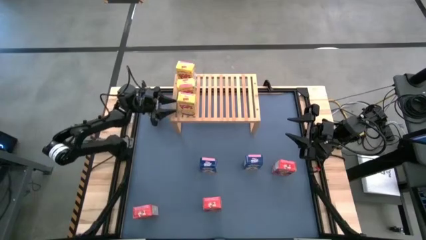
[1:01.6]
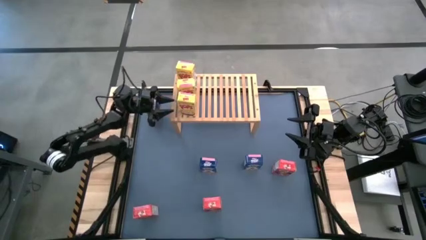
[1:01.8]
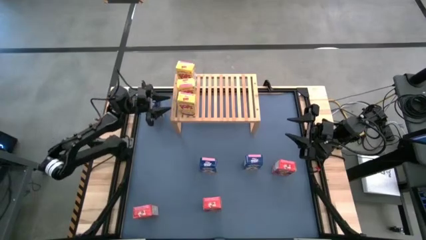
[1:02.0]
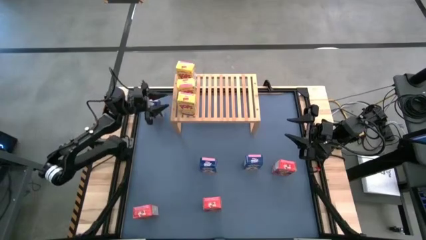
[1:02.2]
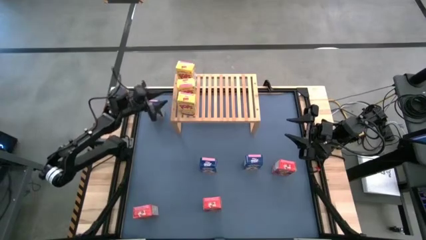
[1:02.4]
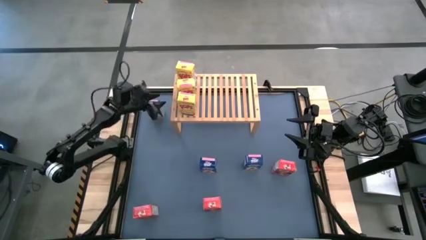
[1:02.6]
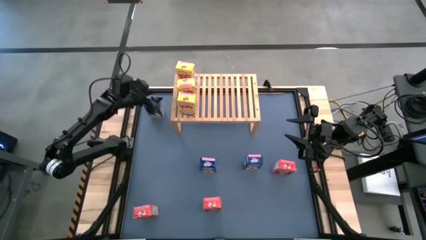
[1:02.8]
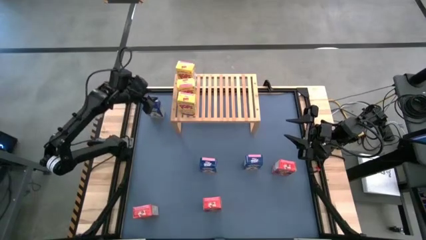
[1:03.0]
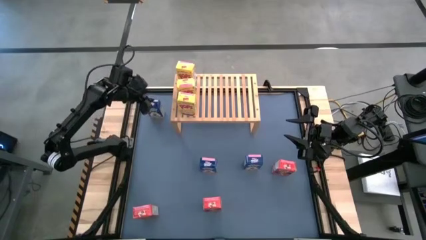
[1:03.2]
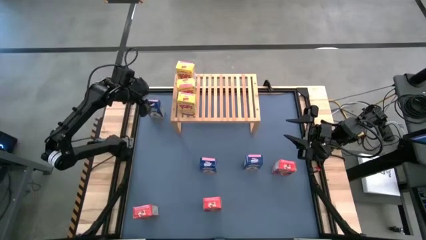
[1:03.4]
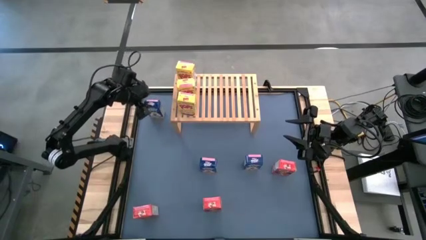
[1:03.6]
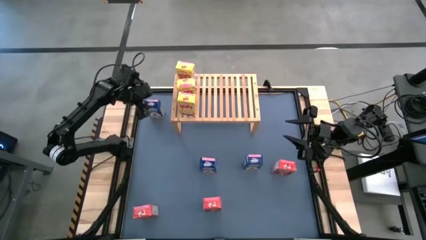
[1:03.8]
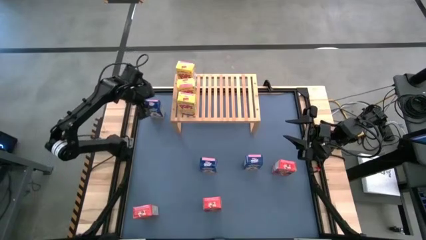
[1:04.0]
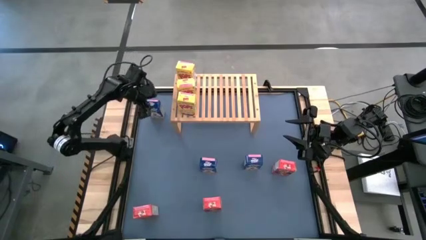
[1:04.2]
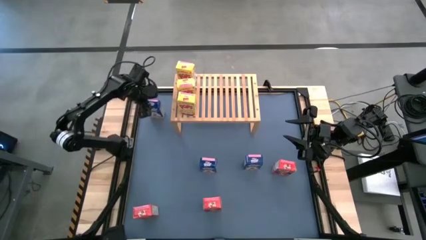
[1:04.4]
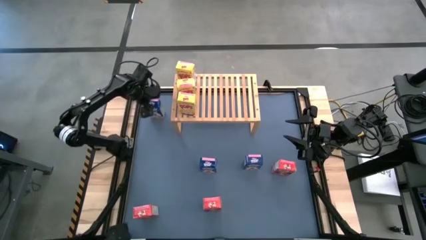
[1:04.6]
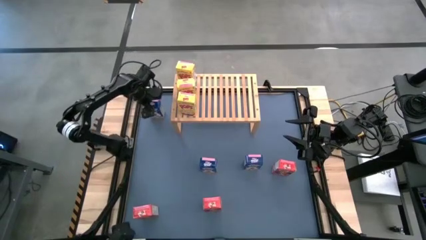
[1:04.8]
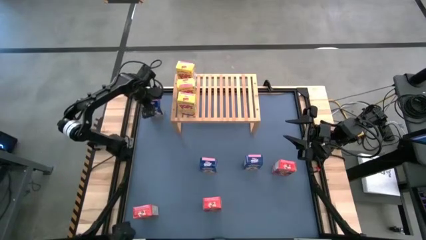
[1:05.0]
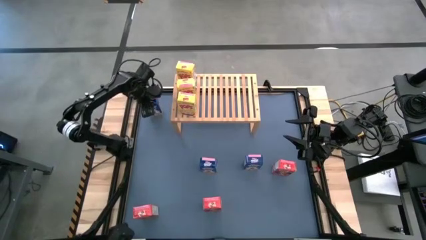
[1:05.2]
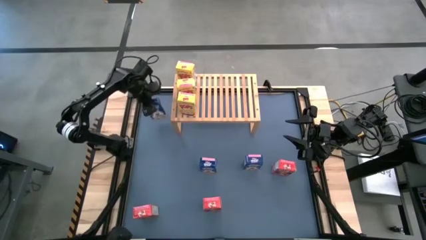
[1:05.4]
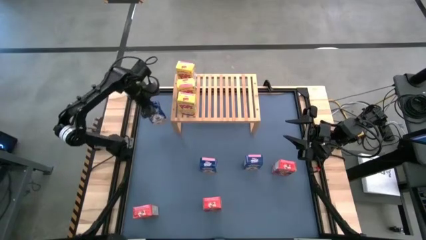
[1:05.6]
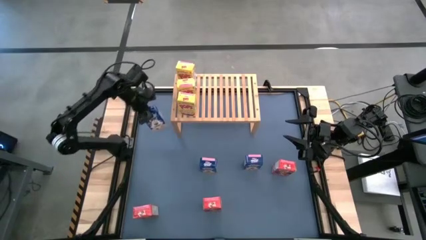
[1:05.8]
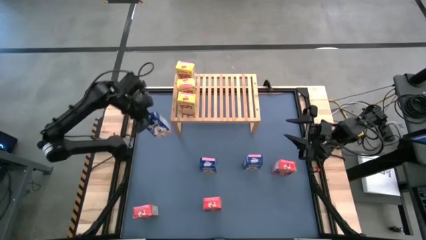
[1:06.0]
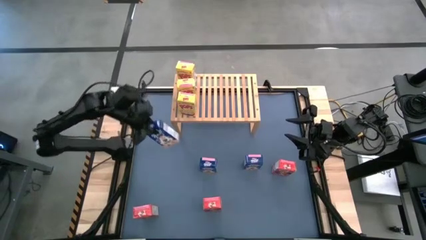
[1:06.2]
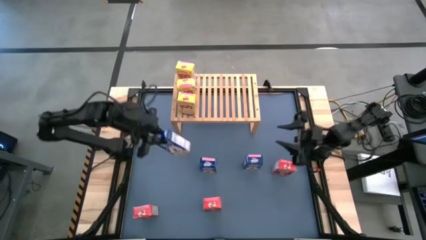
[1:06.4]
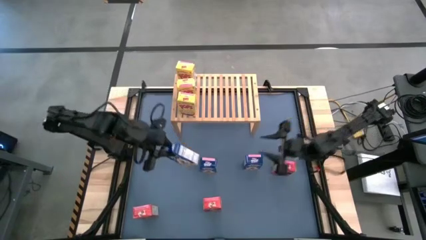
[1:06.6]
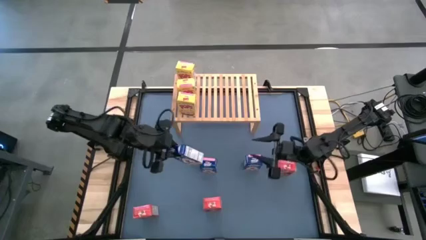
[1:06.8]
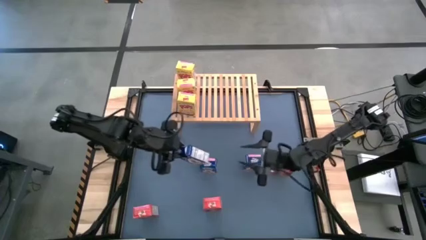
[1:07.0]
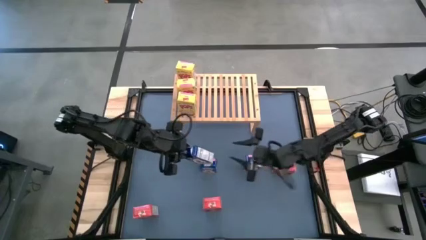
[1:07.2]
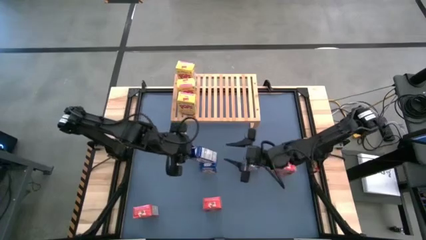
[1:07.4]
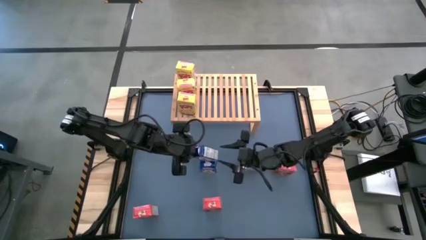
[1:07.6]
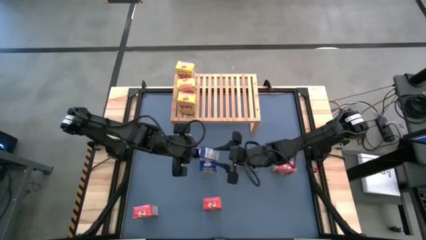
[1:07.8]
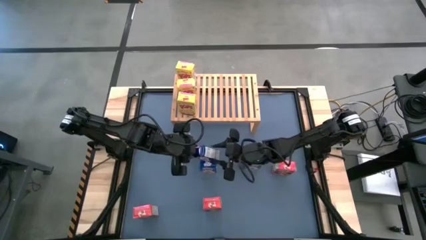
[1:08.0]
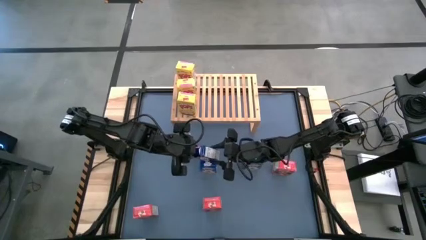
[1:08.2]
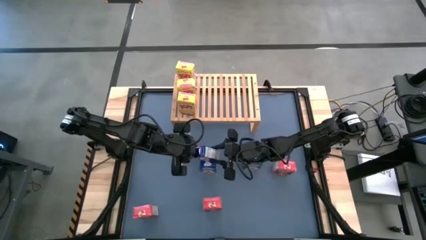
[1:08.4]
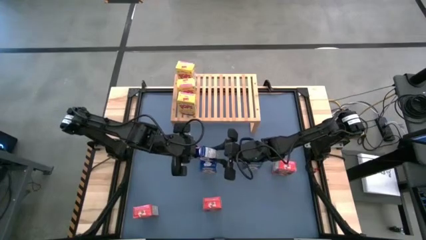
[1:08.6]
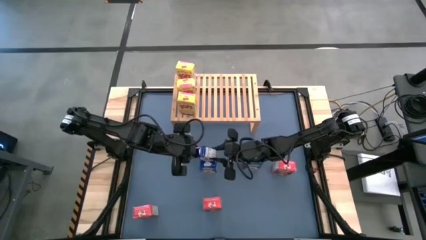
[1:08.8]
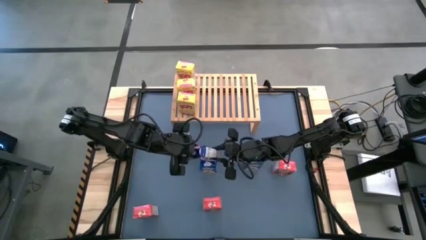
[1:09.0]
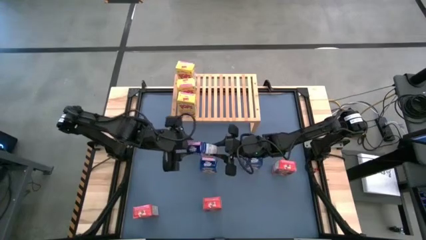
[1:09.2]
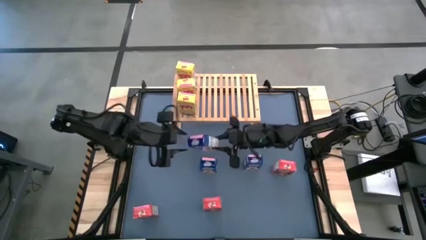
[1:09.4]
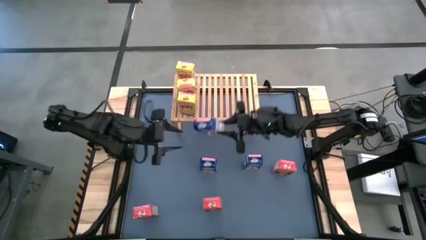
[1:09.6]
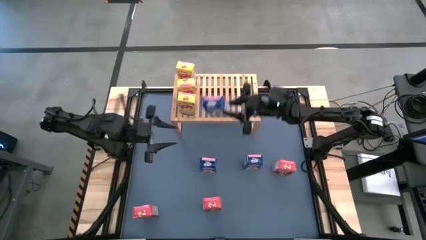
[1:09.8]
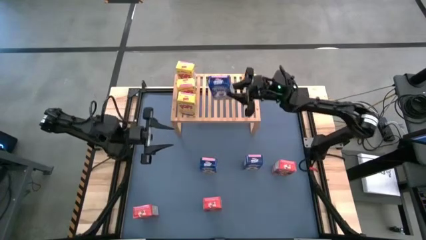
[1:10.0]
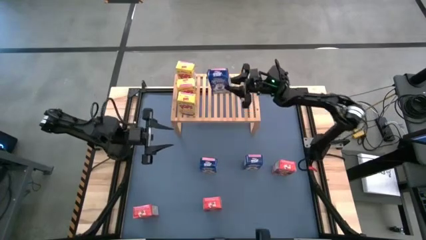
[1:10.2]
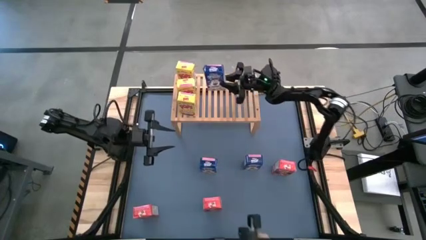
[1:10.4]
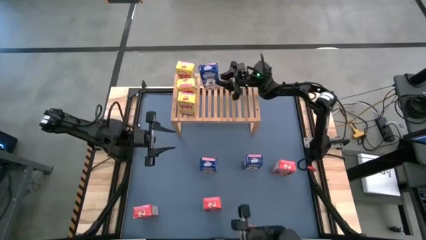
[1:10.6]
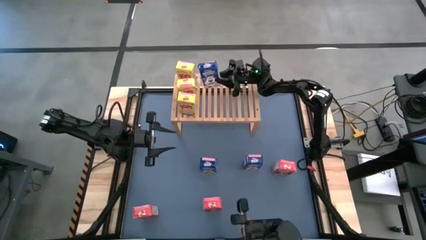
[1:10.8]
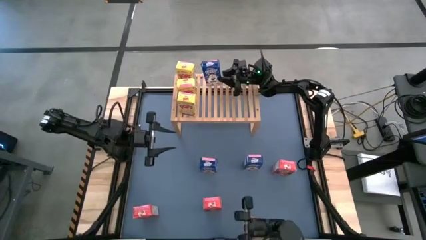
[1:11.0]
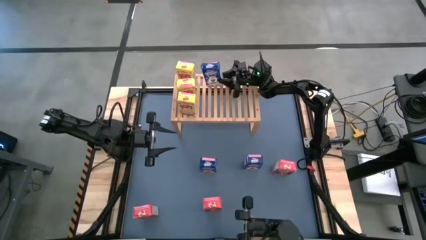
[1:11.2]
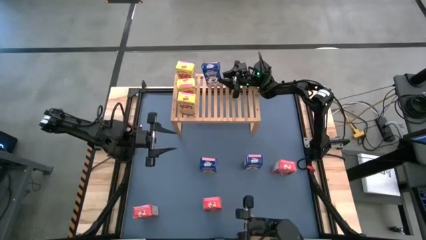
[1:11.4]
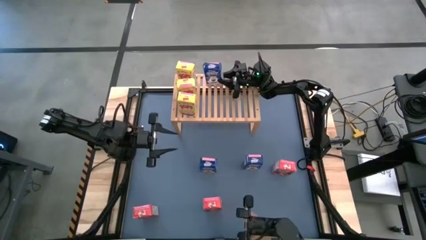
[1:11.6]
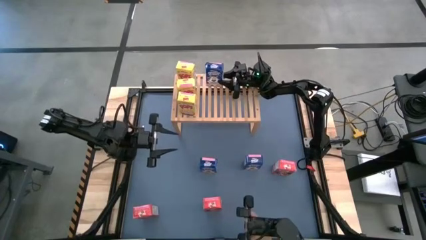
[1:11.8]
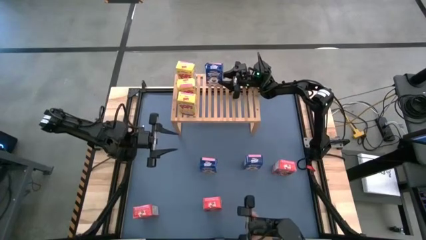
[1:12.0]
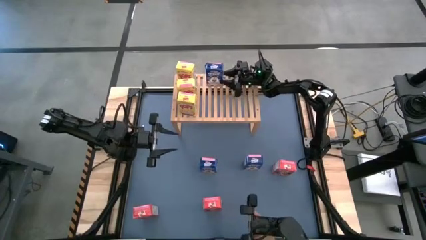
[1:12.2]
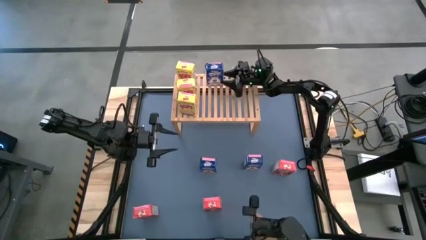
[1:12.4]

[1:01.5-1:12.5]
Task: Stack cereal on shelf
Put the top blue cereal box on the shelf

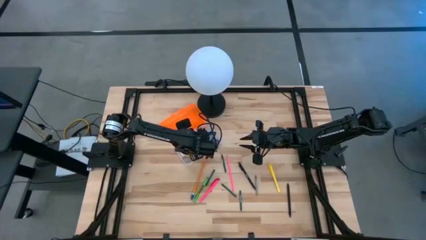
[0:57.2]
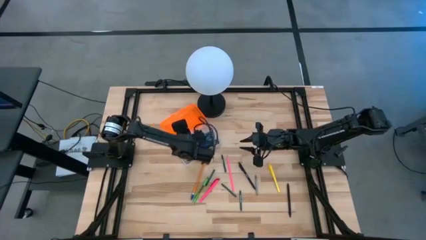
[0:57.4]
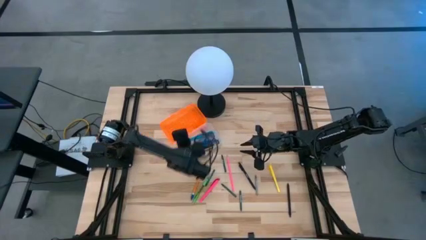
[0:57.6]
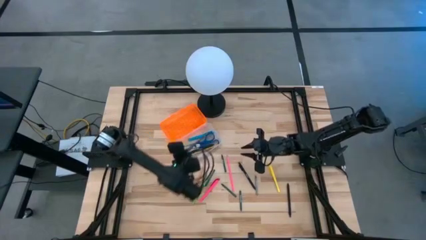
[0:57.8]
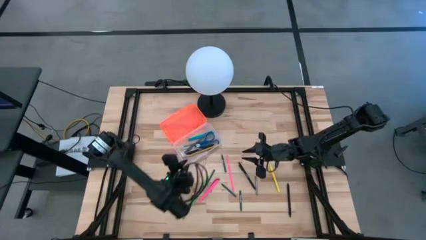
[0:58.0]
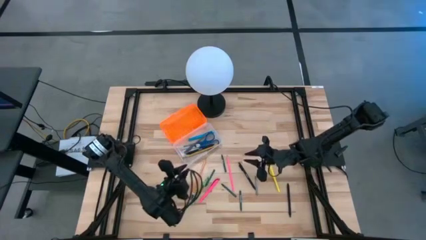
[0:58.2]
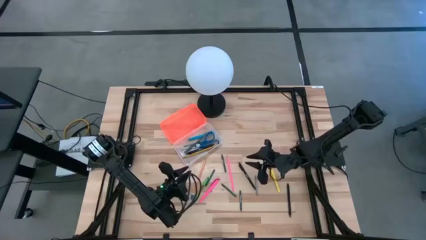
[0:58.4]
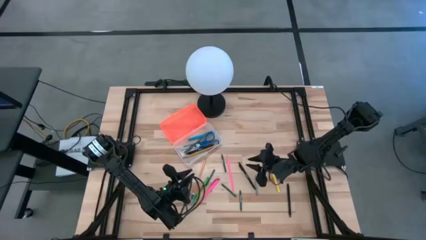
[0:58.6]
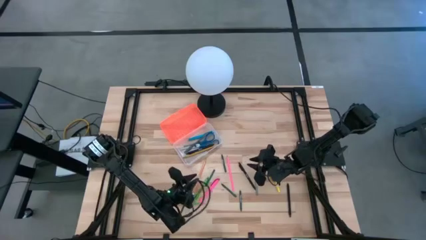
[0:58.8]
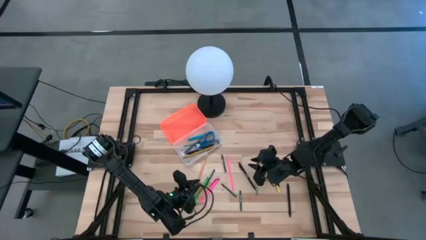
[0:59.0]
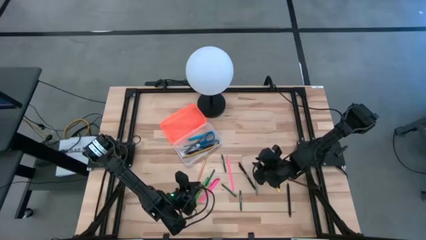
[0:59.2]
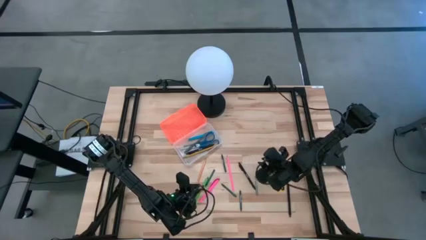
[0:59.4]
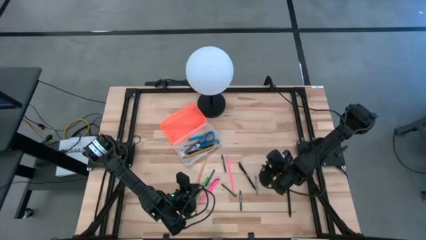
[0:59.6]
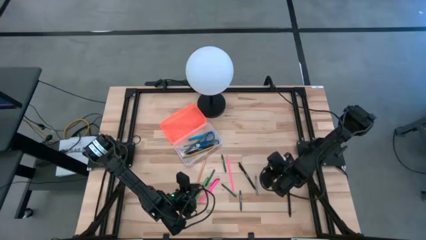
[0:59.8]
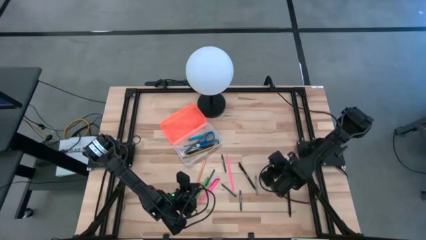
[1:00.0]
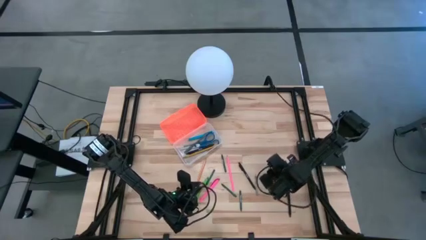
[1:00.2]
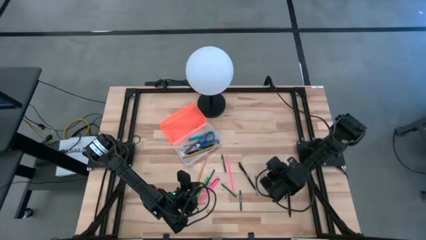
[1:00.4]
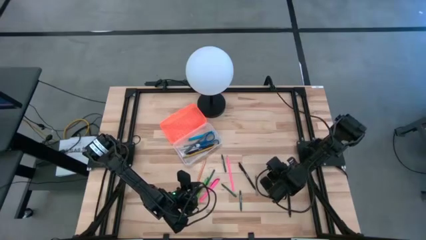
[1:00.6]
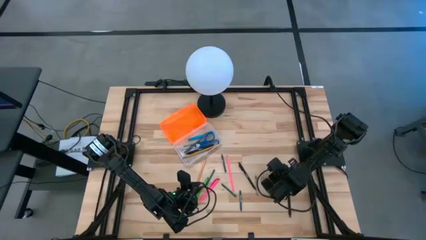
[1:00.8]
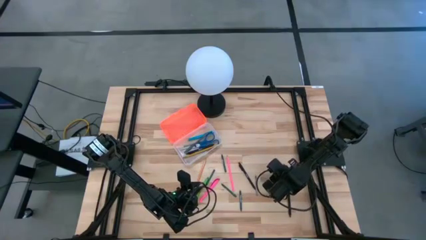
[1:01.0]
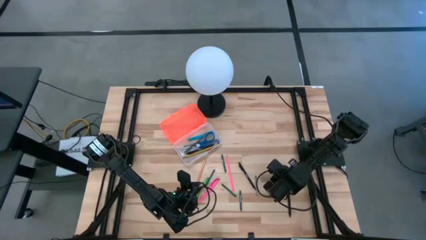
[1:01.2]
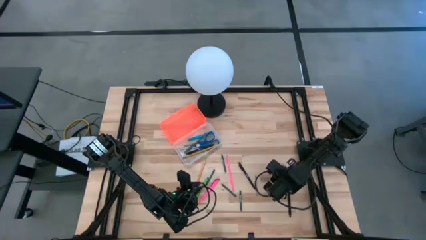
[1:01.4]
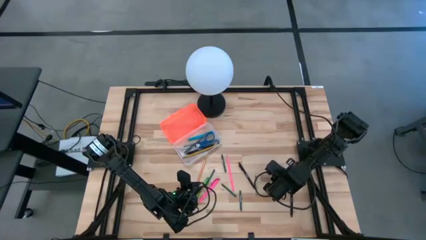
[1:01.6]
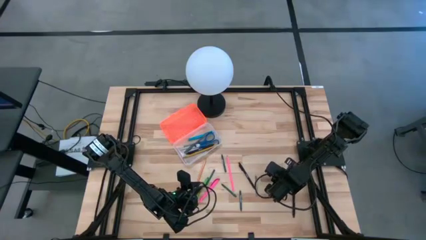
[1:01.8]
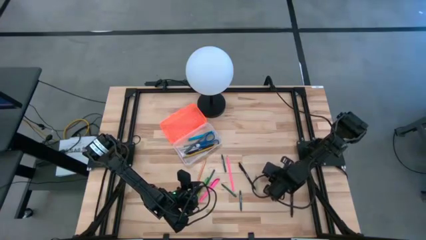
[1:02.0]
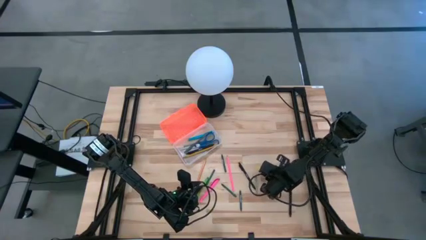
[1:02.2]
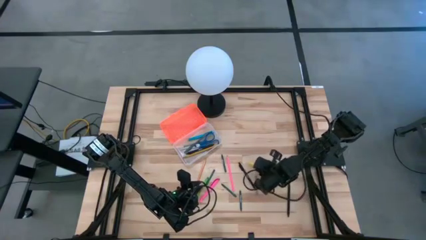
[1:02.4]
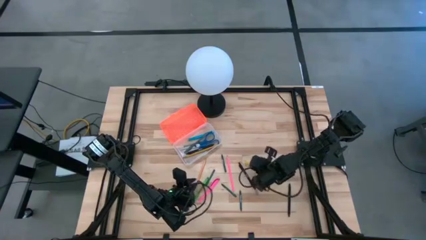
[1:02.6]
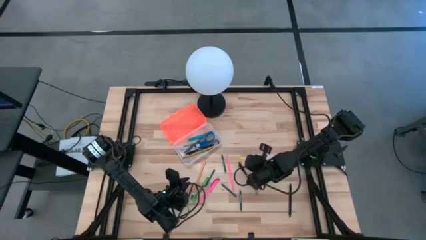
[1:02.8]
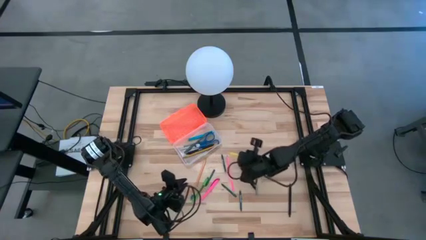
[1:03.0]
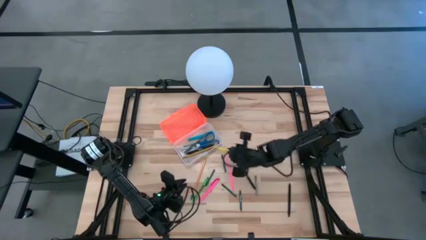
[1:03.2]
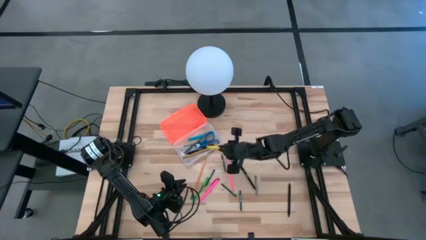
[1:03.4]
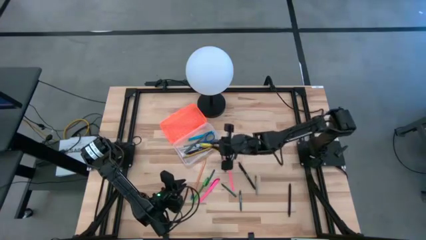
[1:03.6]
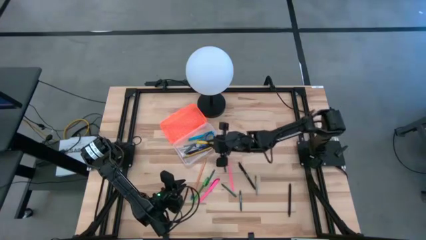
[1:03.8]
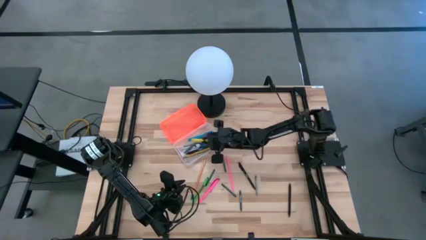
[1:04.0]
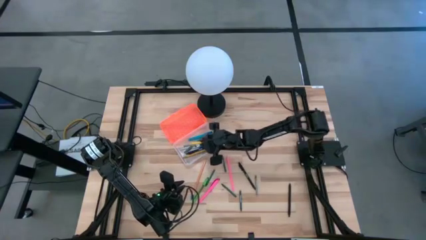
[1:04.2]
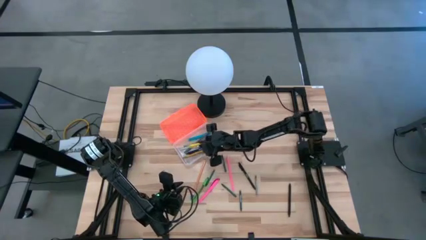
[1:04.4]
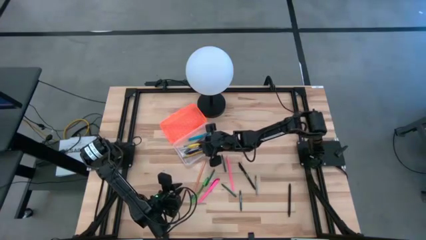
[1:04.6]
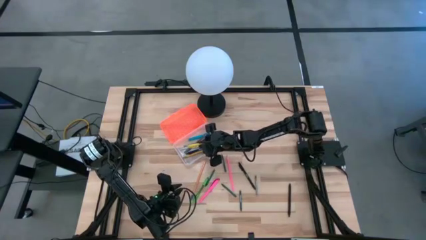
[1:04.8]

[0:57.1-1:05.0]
Task: Pick & place school supplies into a supply box
Put the yellow pen into the orange supply box
